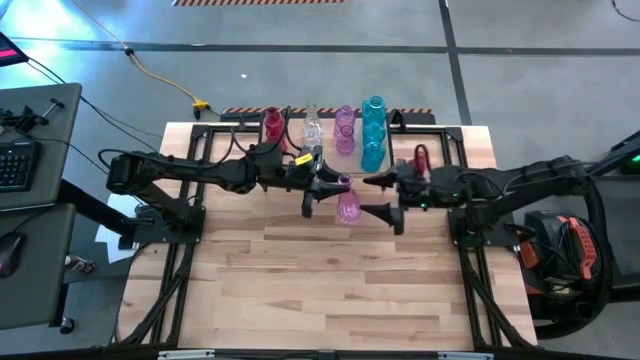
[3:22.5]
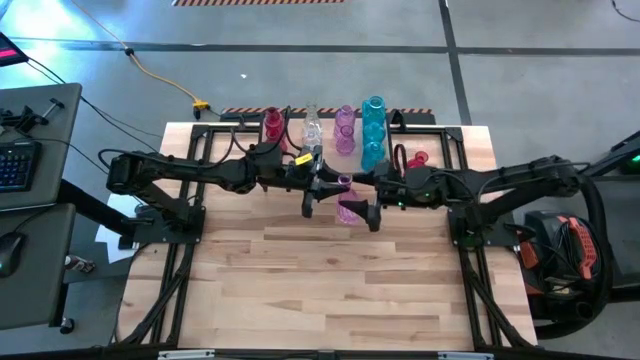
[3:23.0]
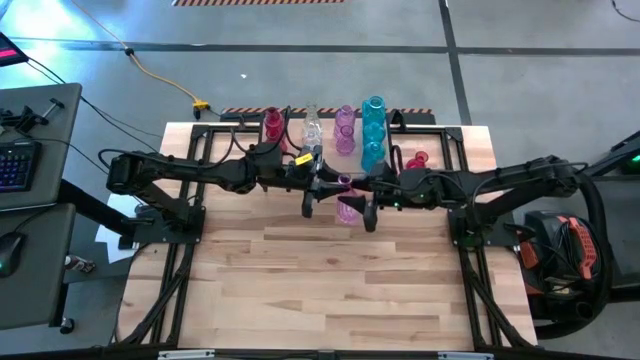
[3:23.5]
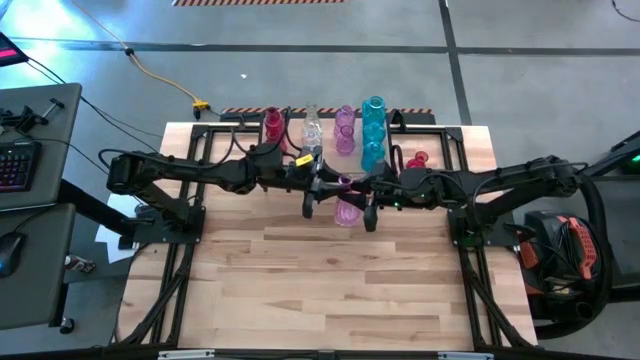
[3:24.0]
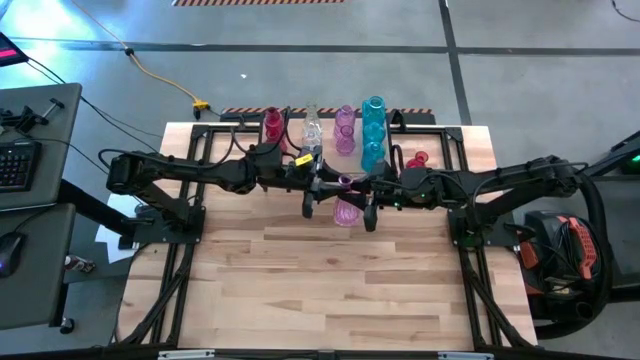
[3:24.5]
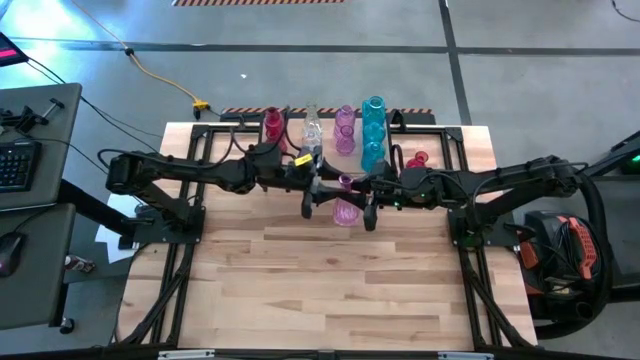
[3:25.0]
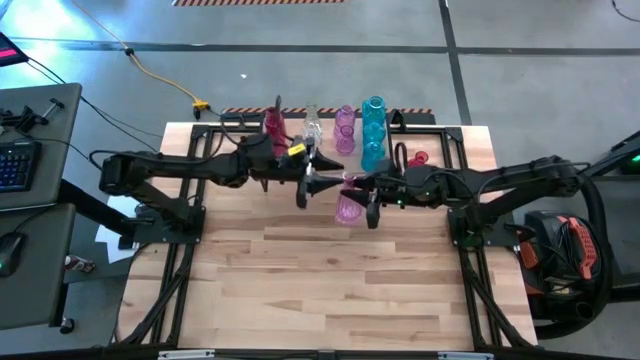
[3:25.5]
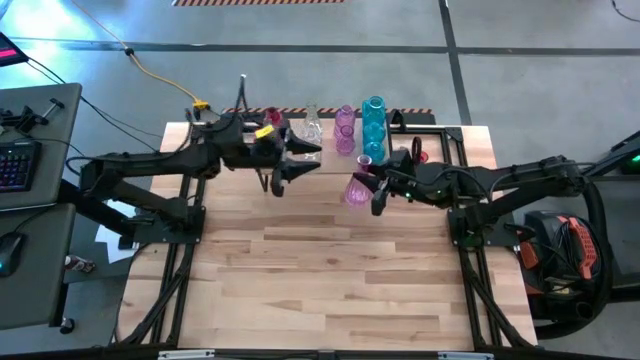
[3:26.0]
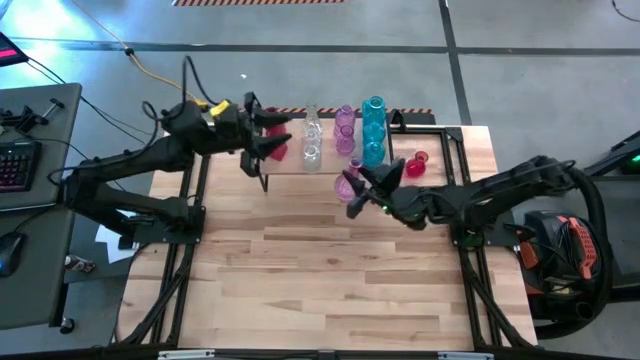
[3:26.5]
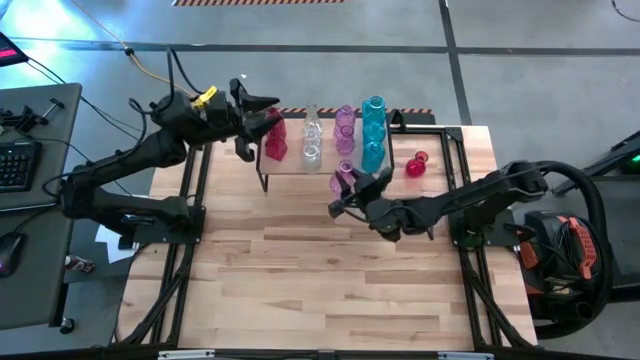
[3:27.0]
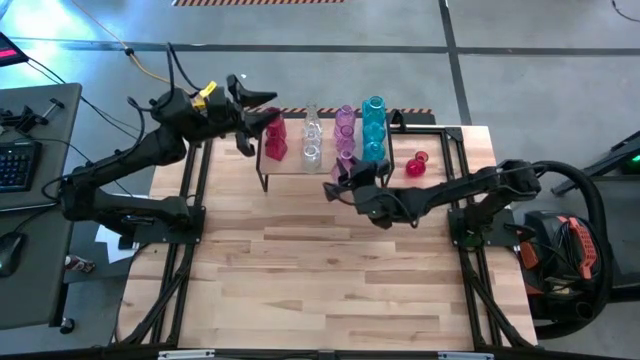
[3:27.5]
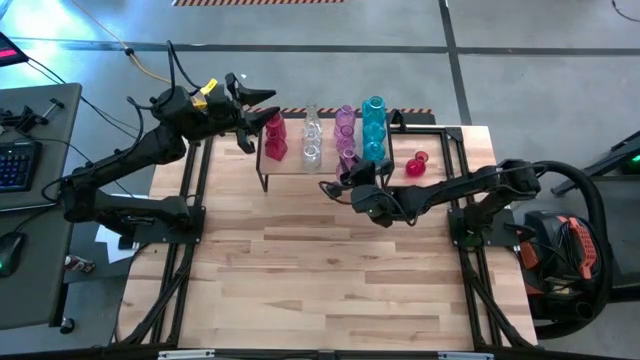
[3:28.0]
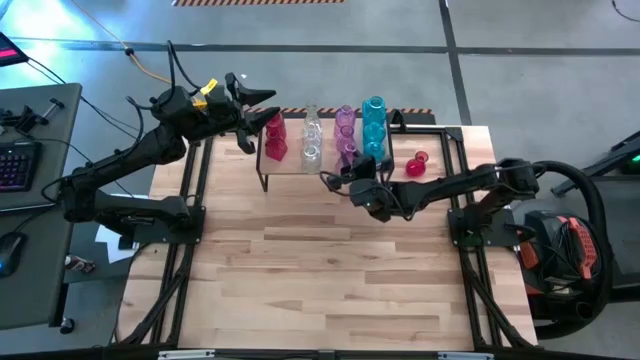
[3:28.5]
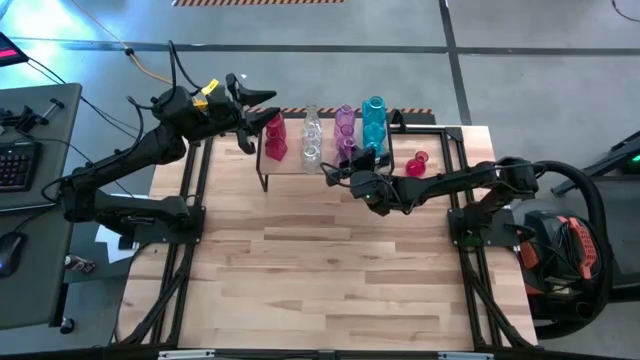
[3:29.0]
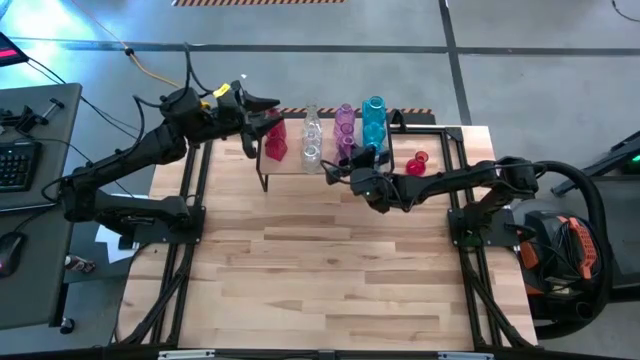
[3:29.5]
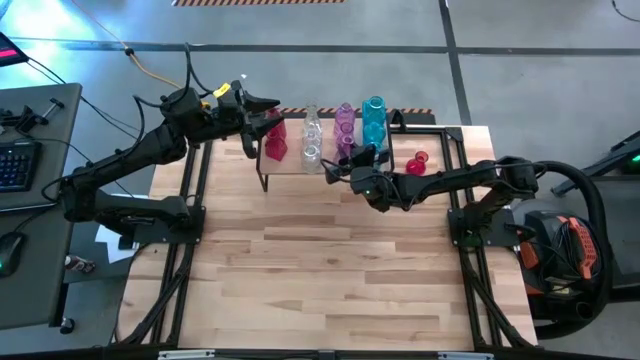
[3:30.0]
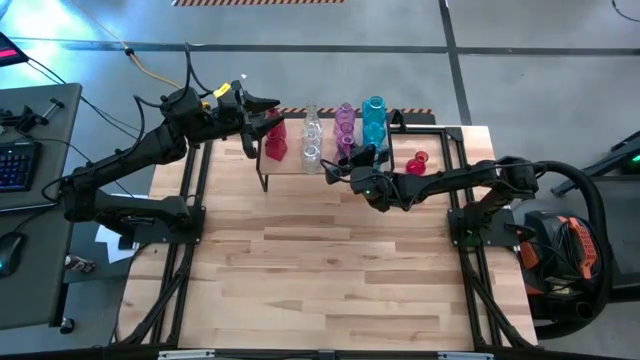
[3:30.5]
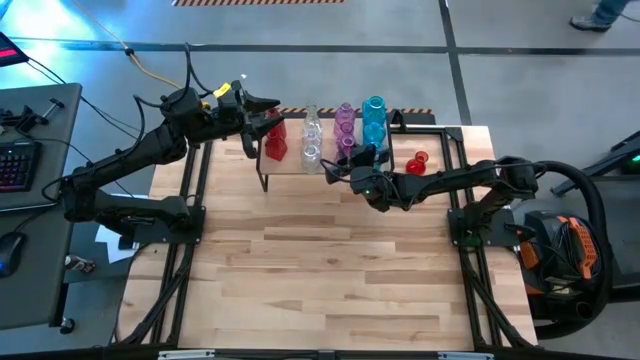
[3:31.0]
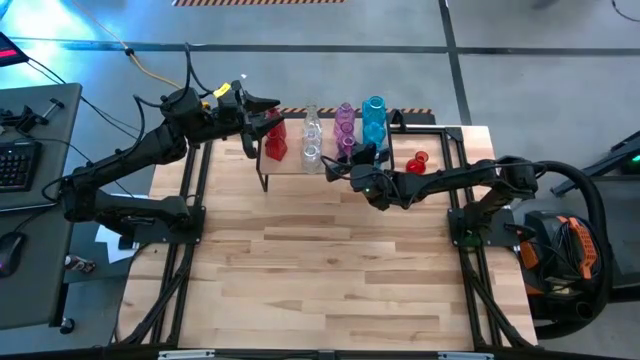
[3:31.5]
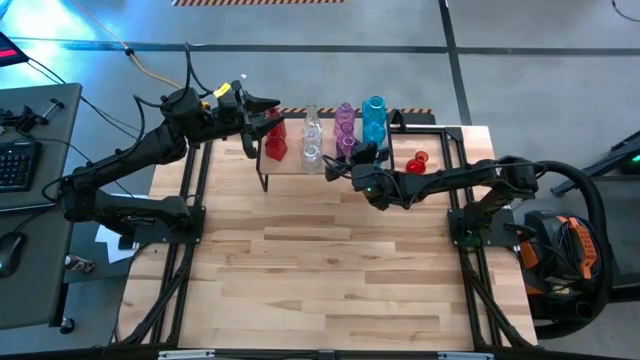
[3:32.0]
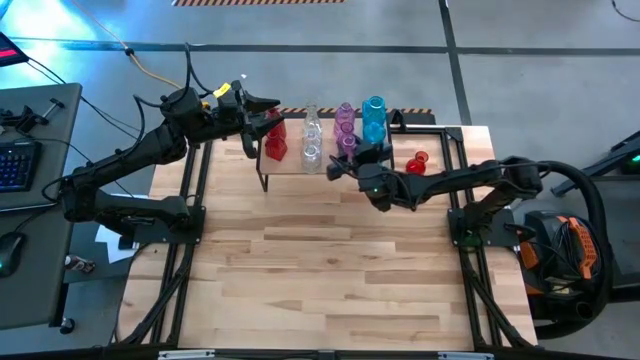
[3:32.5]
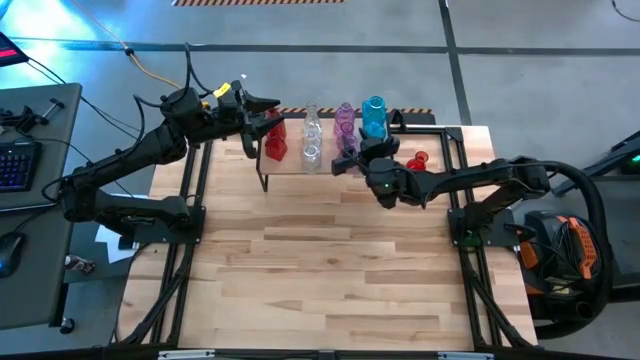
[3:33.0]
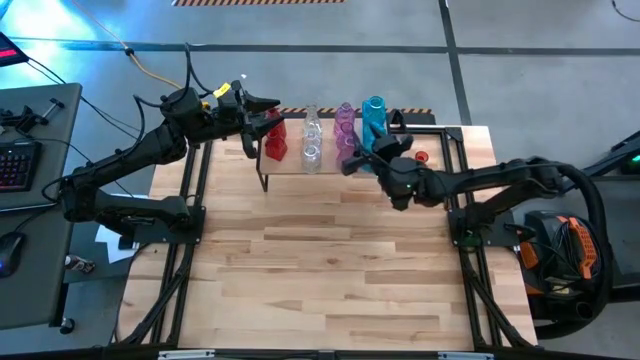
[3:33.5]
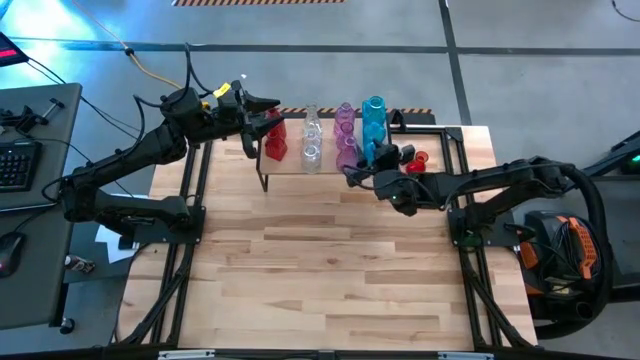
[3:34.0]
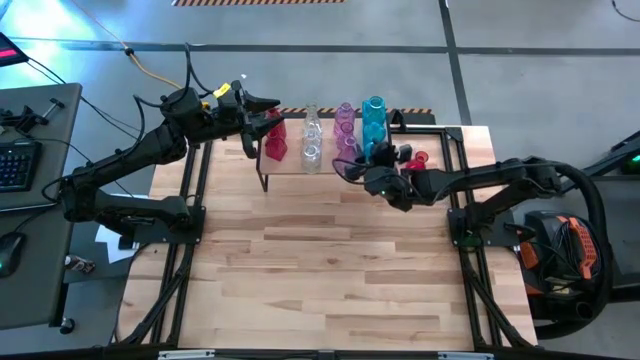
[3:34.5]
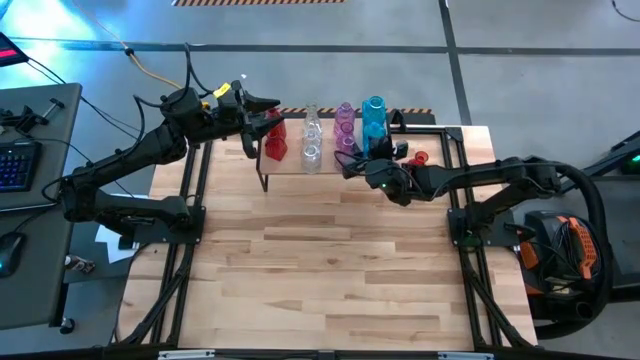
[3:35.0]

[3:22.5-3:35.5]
Task: sort vases onto shelf
Put the violet vase on the shelf aligned with the other violet vases

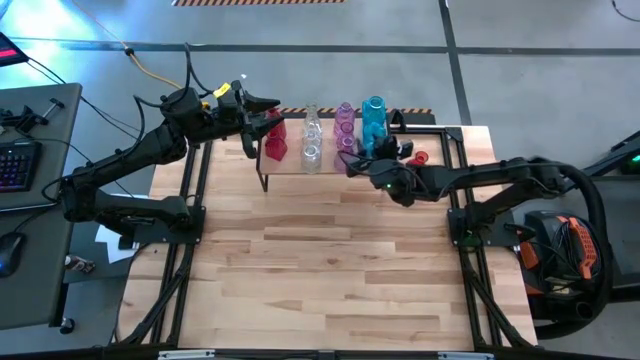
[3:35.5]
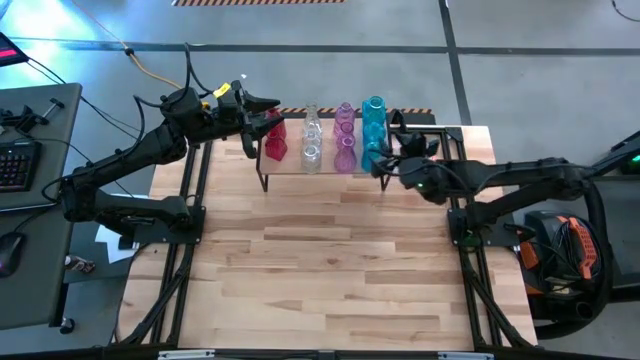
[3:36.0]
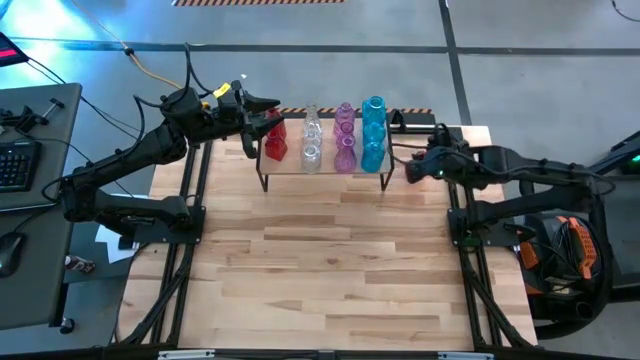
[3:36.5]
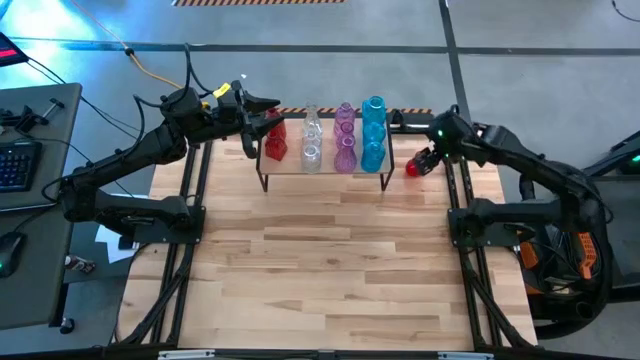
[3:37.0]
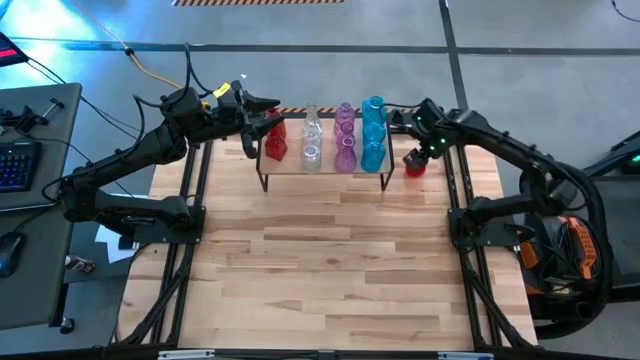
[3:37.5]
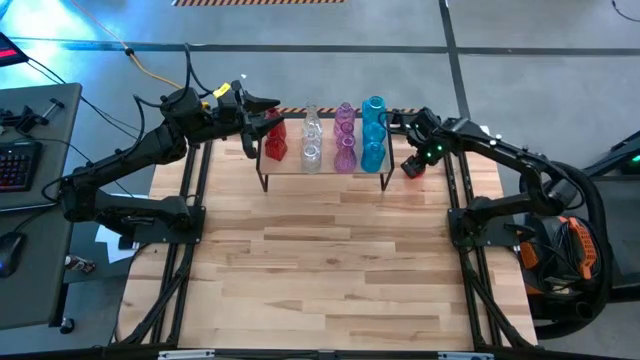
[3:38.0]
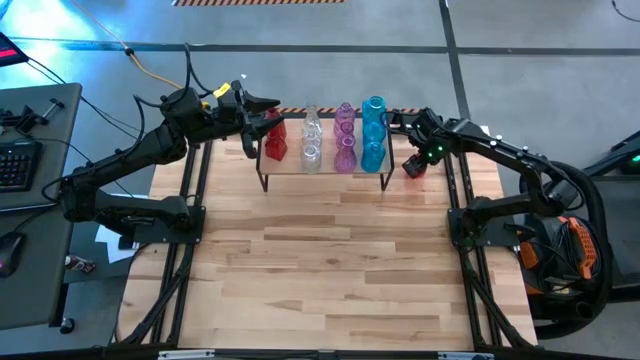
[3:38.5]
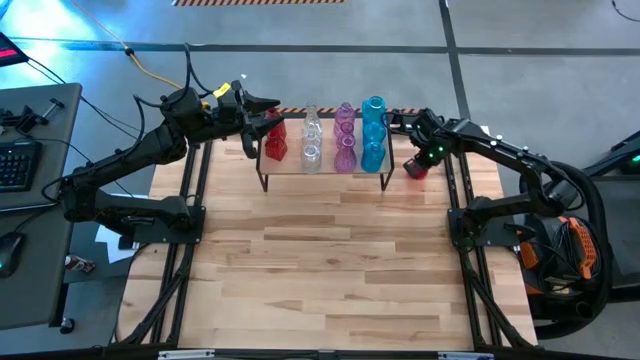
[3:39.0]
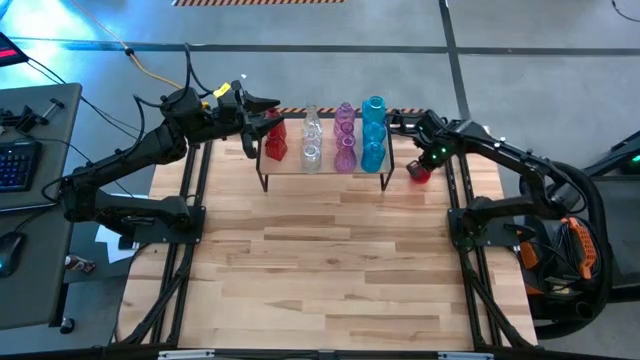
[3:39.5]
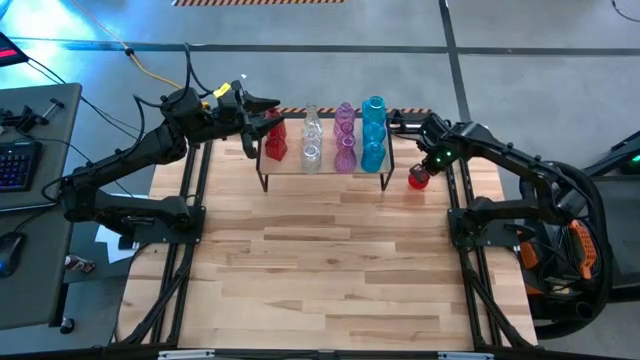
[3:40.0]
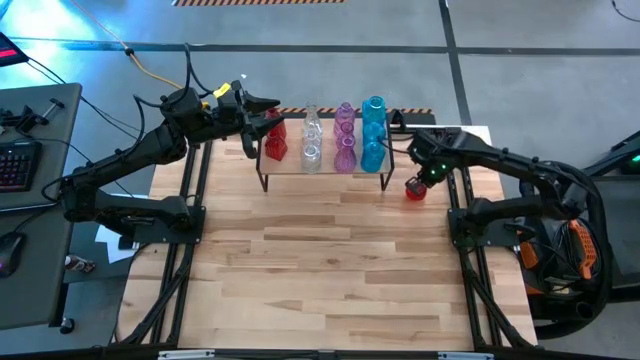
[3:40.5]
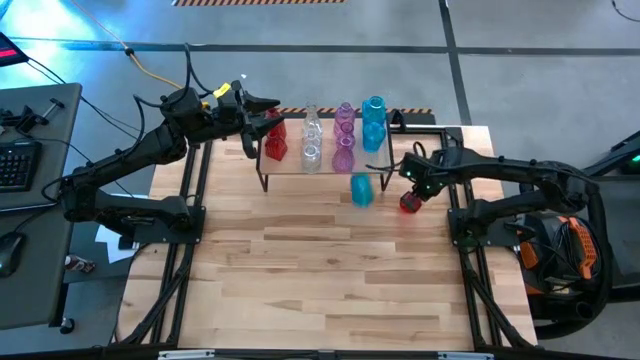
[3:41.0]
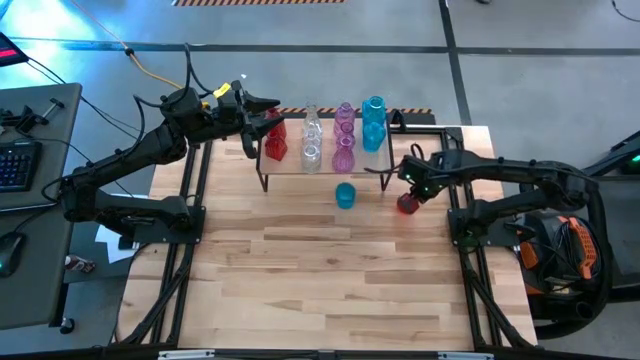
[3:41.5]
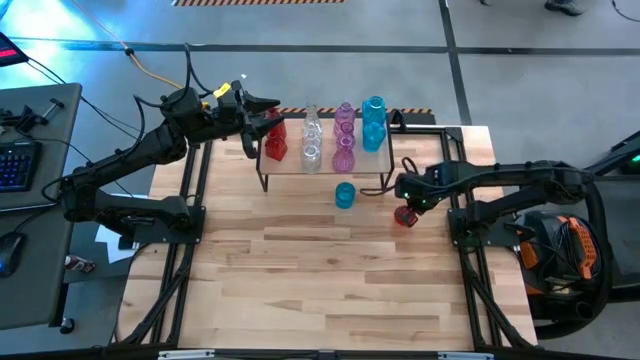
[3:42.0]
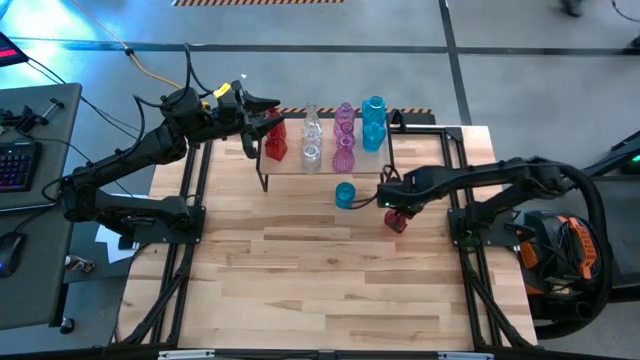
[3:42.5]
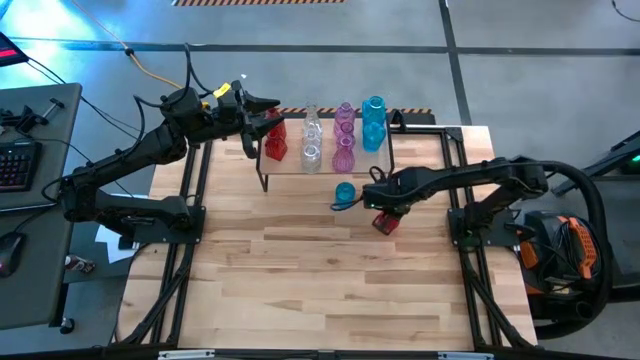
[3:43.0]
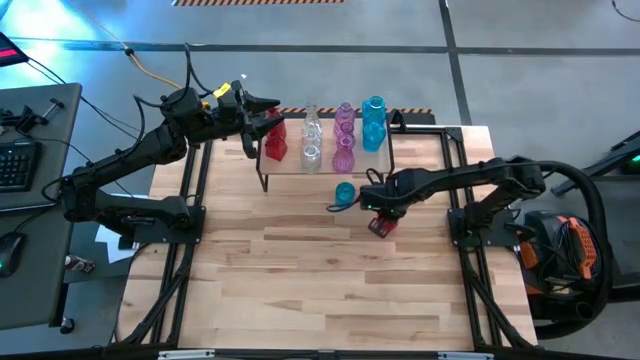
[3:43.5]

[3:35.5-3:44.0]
Put the red vase on the shelf aligned with the other red vases
